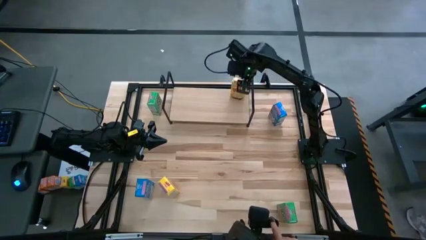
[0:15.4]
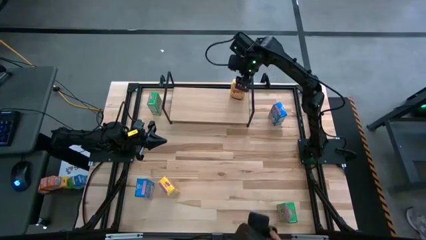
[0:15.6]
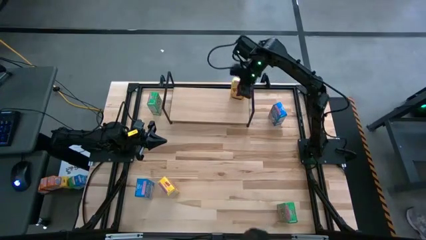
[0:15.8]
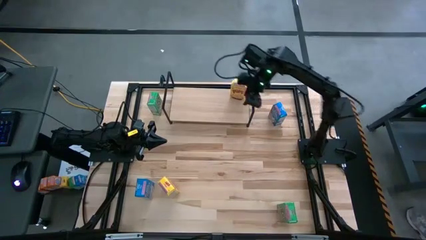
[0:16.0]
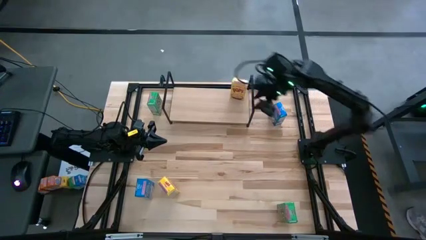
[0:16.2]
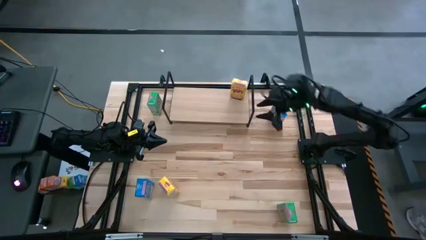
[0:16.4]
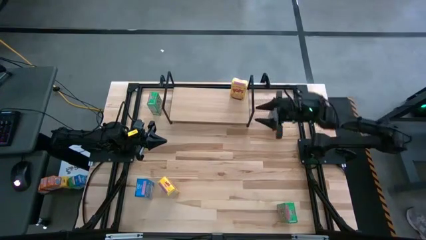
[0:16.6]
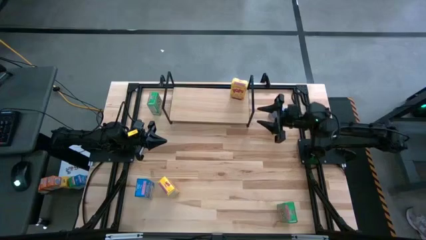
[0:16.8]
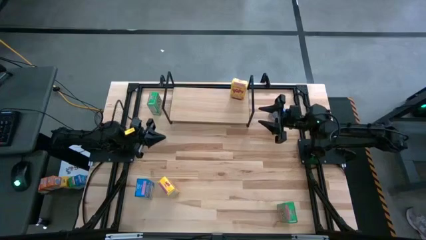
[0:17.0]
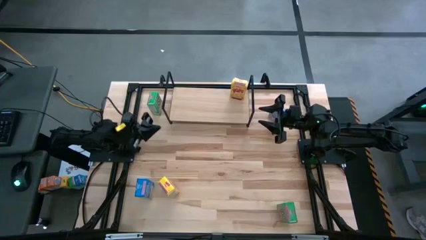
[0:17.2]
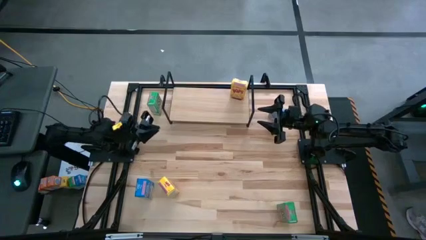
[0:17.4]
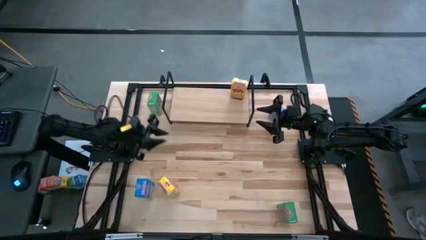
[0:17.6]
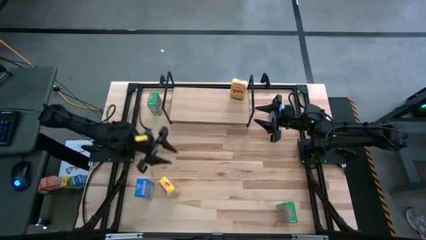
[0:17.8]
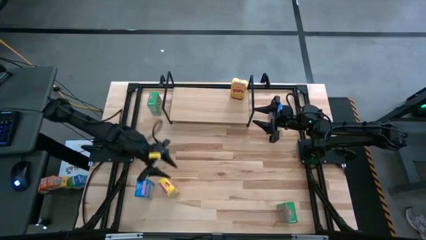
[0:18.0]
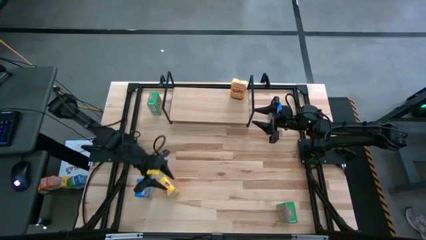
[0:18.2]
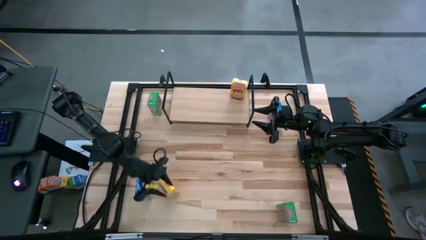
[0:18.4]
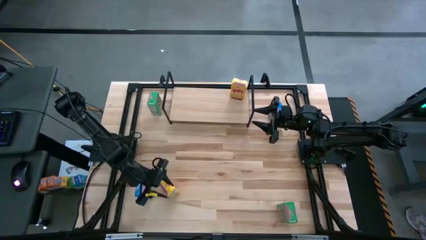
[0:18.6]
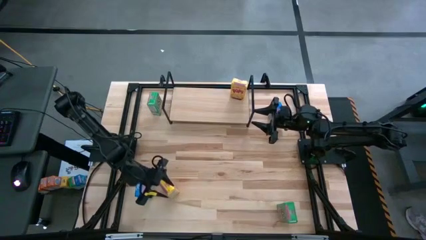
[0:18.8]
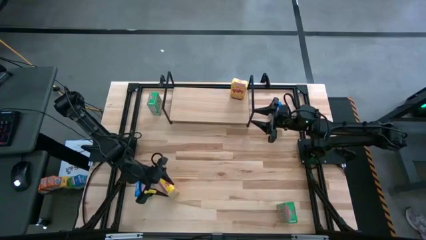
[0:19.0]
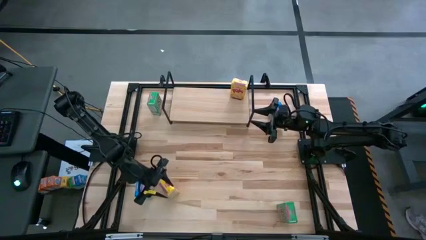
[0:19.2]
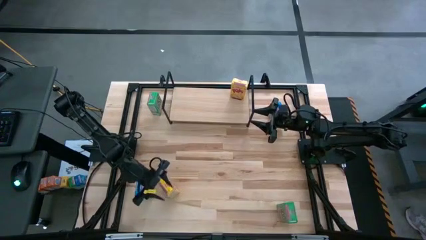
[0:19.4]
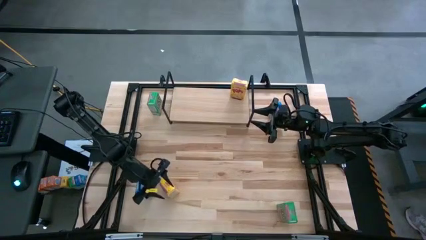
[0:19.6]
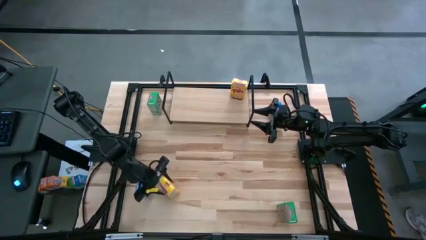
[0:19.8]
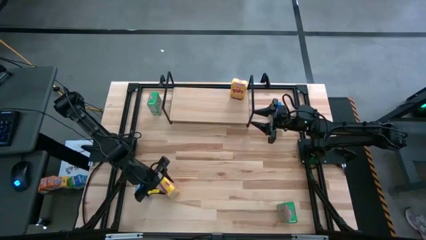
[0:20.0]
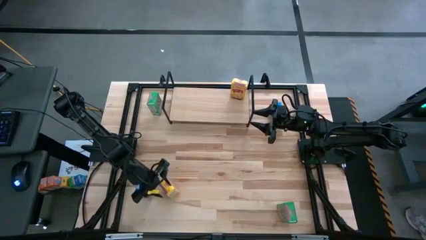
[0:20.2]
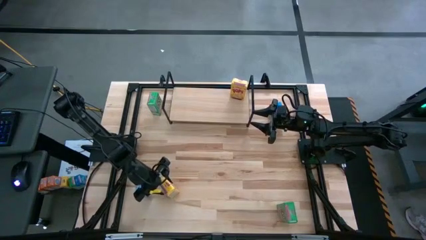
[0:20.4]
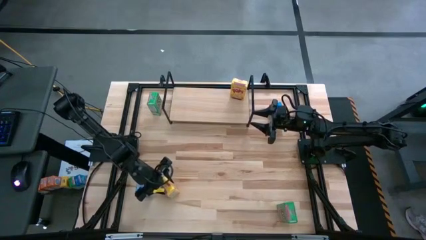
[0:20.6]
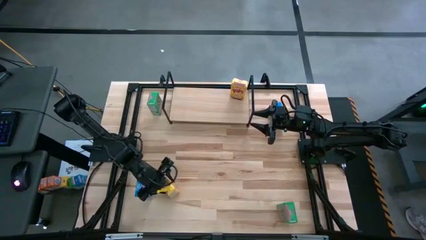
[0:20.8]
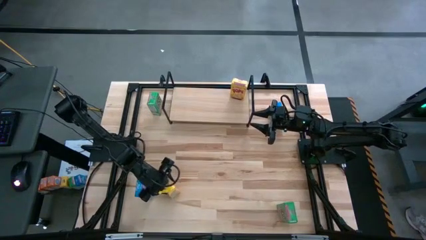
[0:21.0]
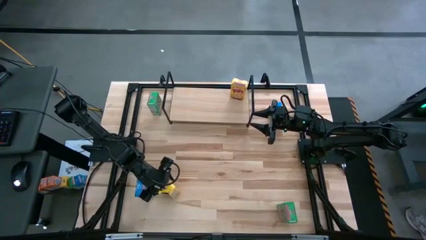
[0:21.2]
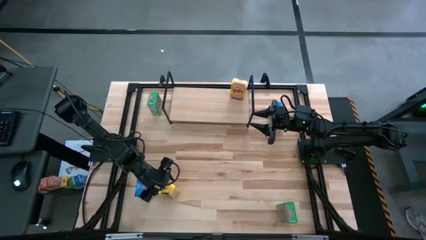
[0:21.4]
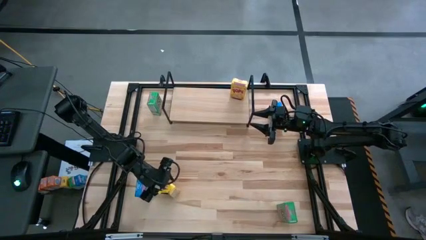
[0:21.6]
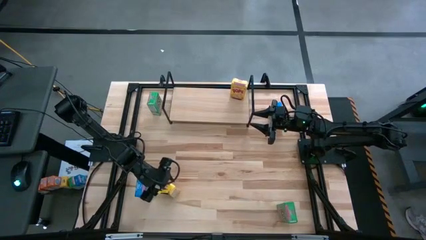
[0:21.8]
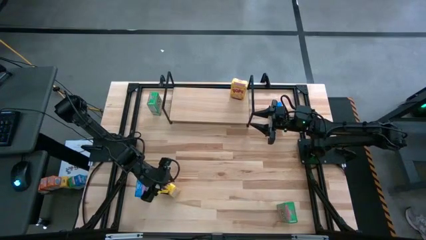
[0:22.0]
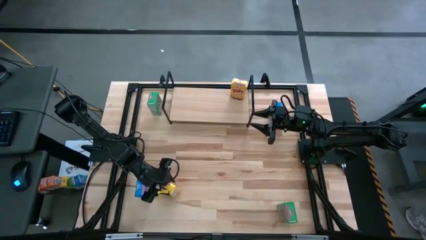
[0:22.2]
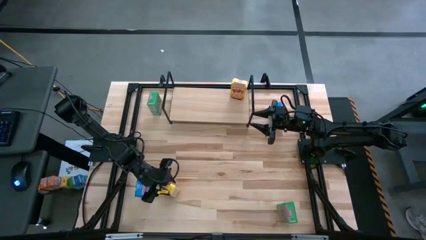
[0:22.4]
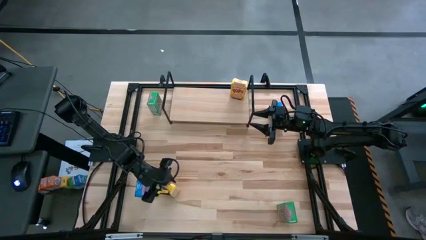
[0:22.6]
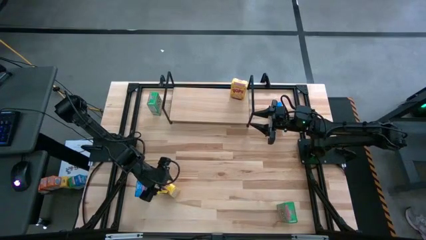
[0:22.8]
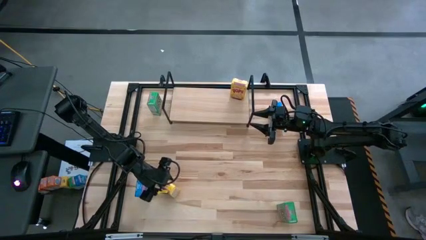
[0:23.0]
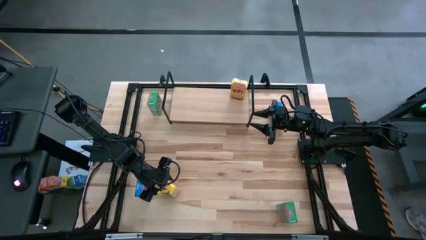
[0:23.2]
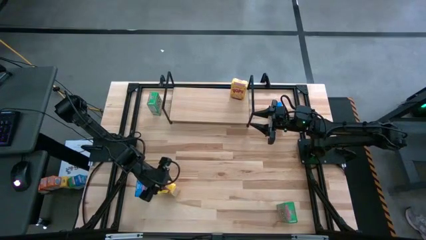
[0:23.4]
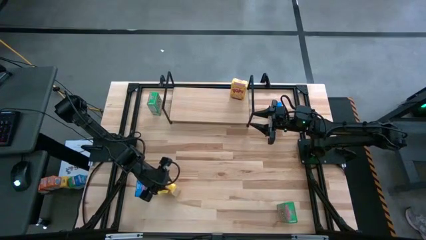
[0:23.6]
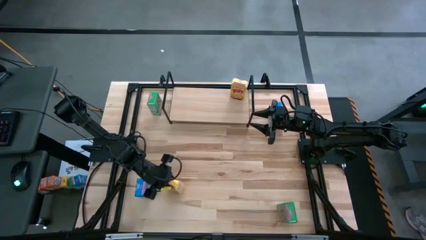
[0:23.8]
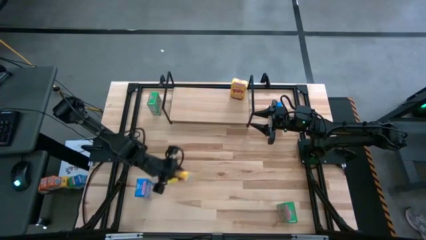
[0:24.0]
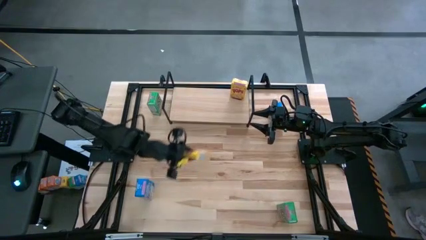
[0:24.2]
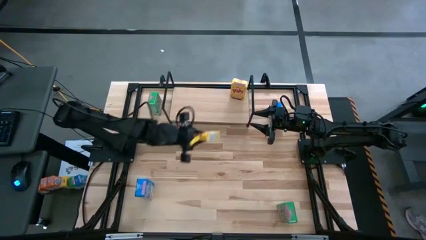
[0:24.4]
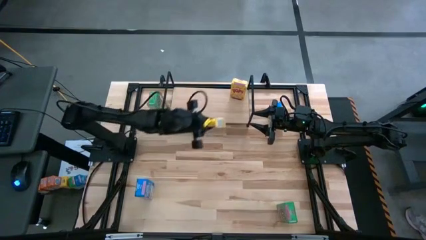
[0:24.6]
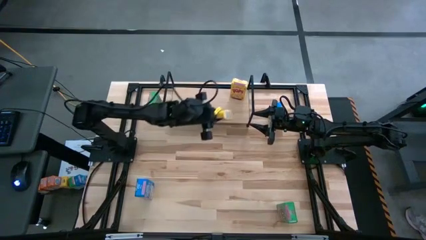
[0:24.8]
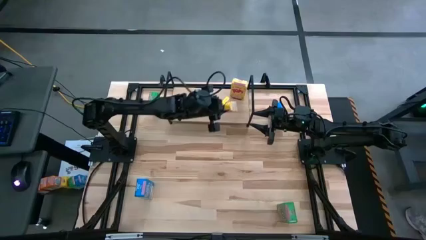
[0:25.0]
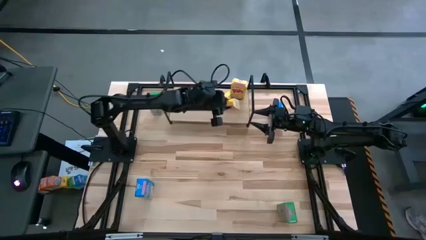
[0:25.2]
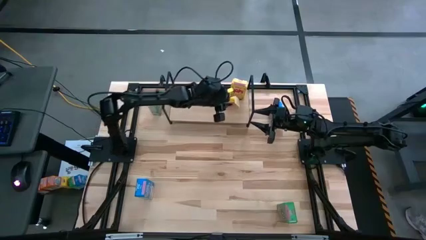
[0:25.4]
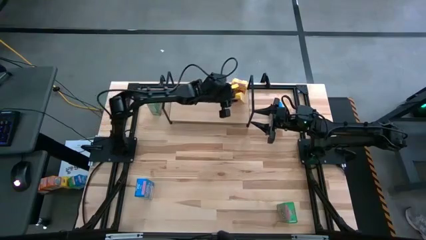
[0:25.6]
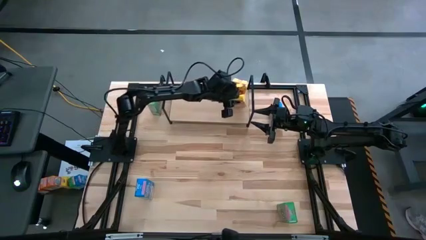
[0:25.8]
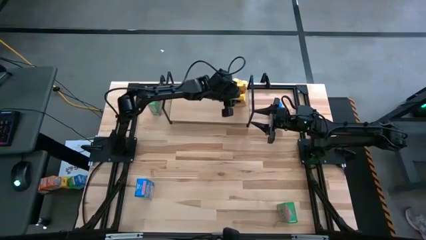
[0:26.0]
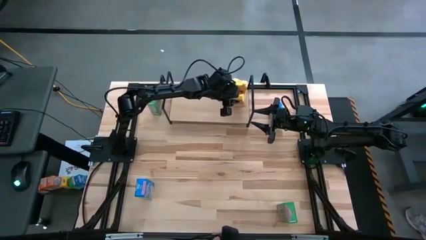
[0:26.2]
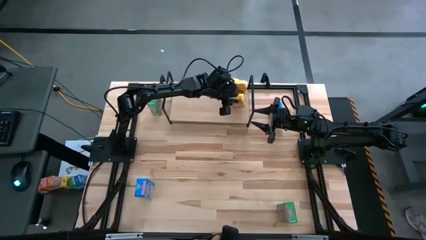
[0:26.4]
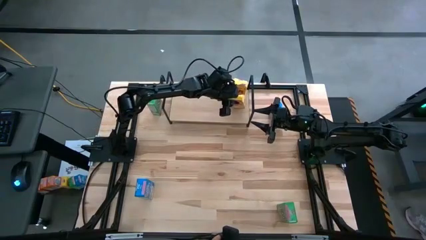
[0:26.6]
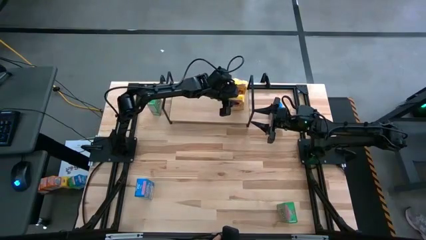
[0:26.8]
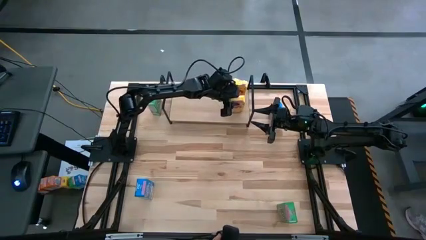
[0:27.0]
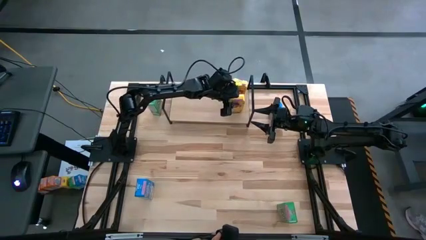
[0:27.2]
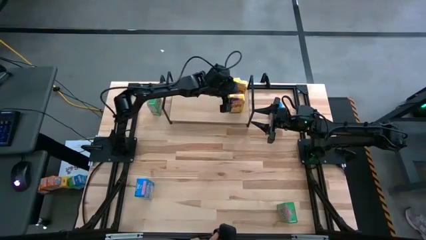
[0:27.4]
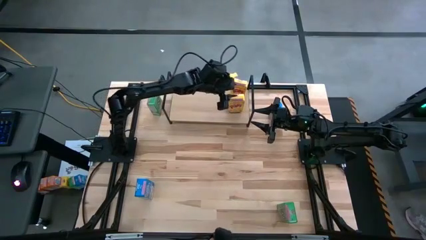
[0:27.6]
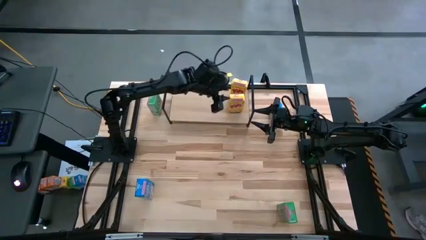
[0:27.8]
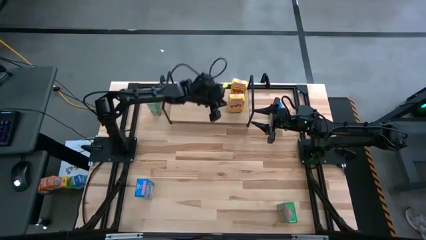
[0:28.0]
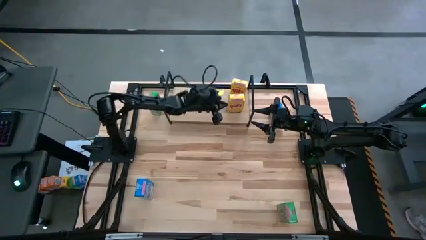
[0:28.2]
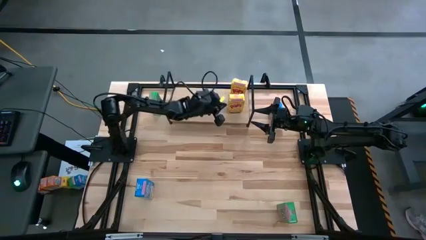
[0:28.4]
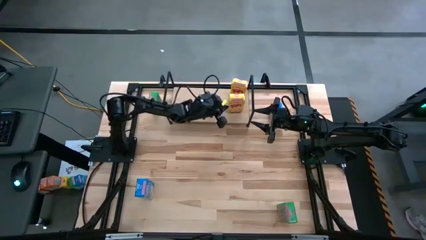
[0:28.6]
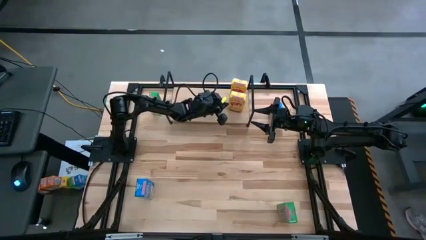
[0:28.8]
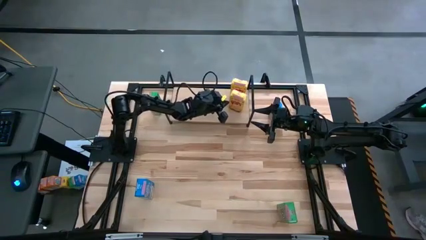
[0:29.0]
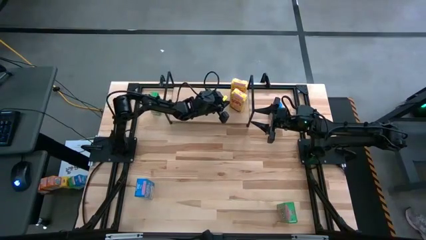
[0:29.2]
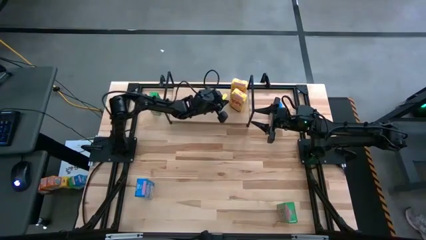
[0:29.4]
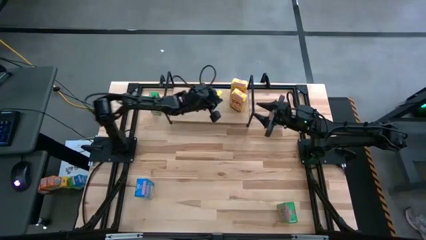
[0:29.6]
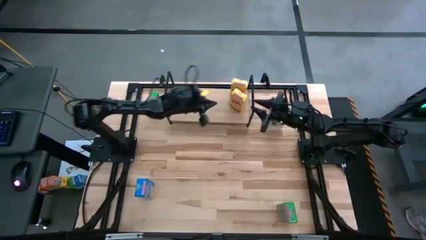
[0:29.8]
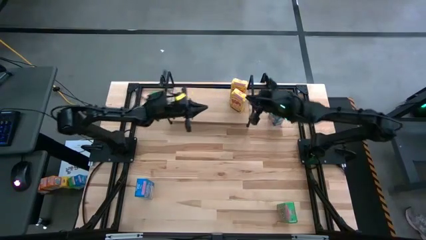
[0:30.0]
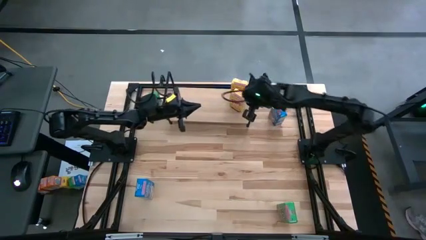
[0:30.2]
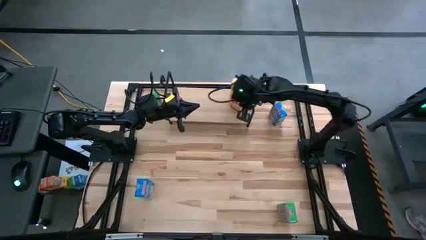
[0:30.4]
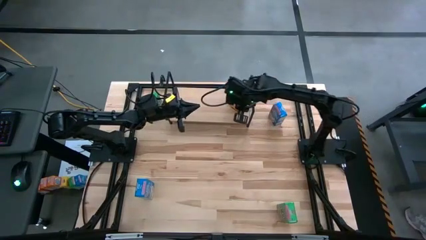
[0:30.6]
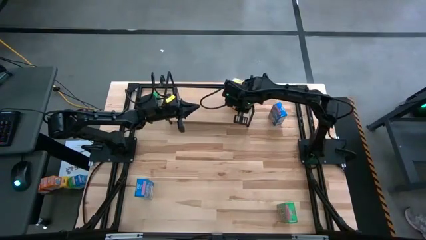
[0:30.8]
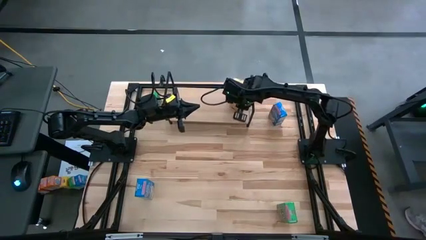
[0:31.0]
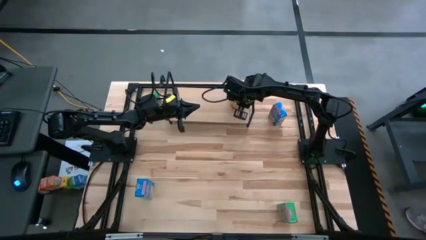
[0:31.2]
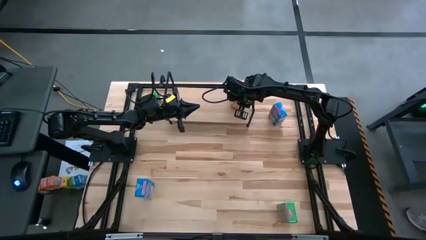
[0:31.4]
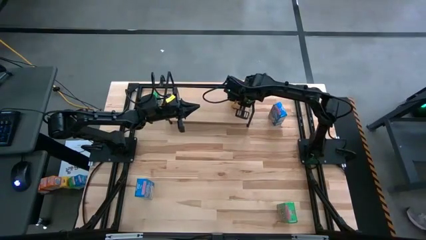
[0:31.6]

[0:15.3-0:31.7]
Task: Stack cereal on shelf
Put the yellow cereal box on the shelf aligned with the other yellow cereal box

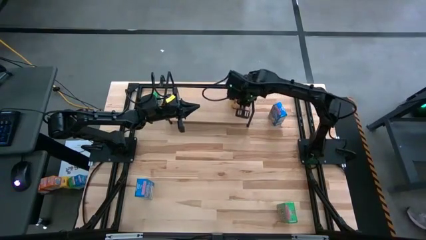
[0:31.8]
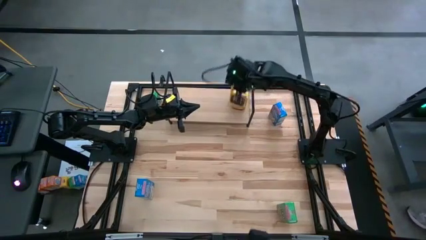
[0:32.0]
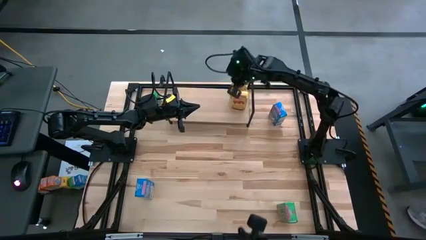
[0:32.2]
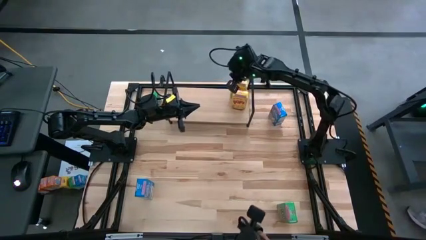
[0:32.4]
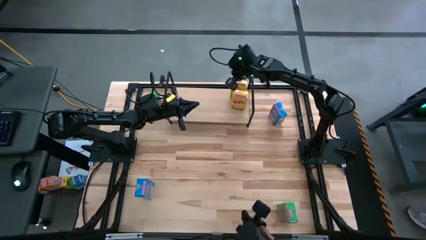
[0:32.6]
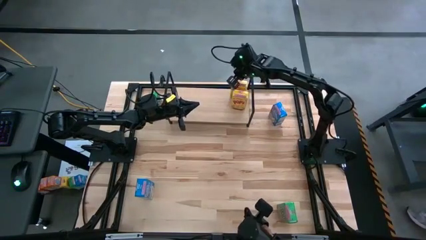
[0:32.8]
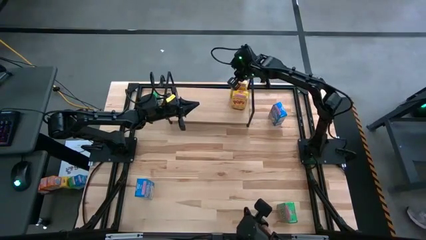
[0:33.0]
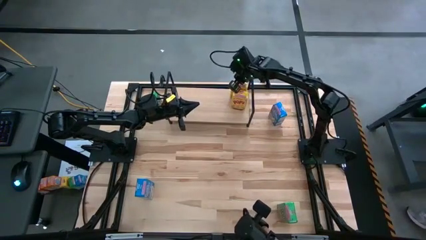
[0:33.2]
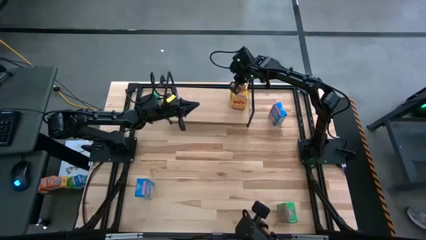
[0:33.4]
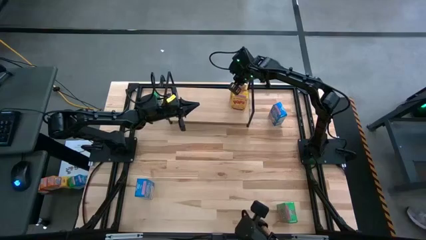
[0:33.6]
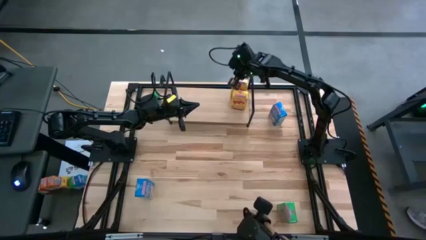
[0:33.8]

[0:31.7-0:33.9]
Adjust the yellow cereal box on the shelf
